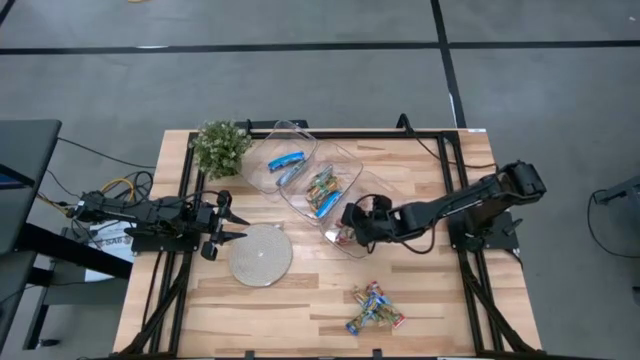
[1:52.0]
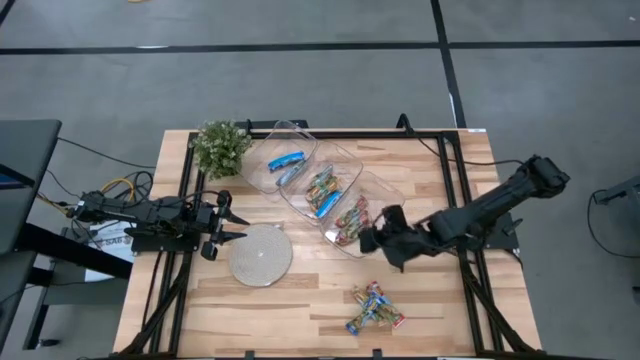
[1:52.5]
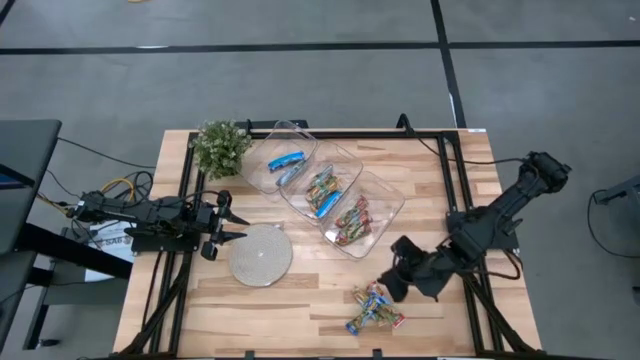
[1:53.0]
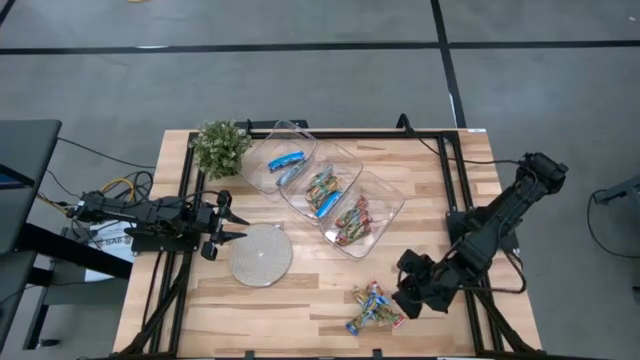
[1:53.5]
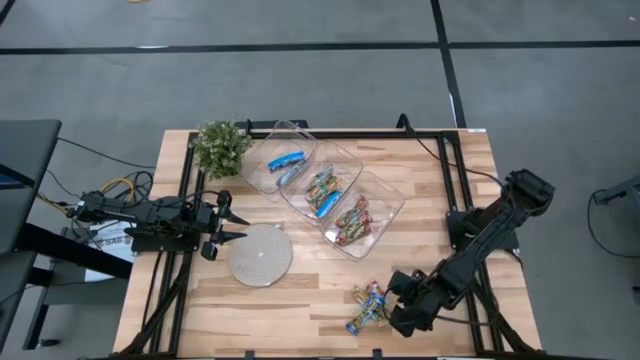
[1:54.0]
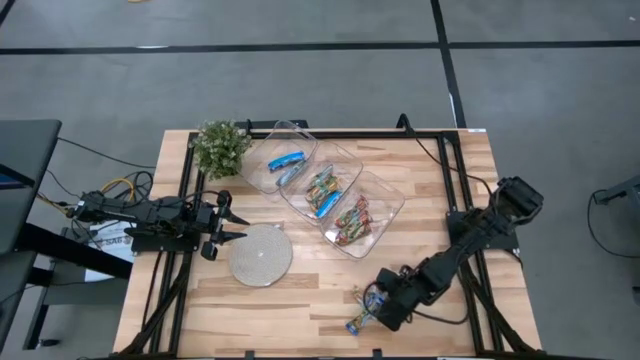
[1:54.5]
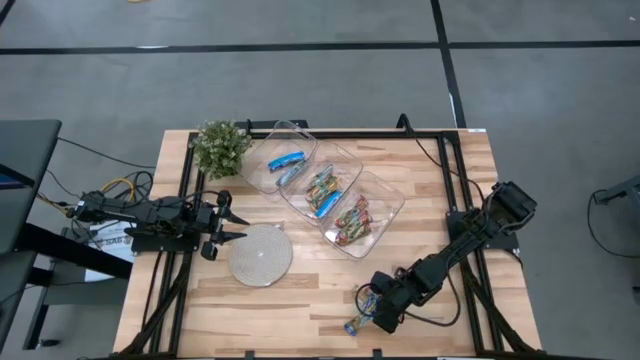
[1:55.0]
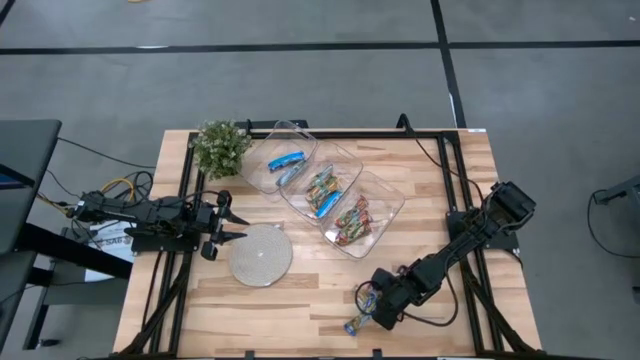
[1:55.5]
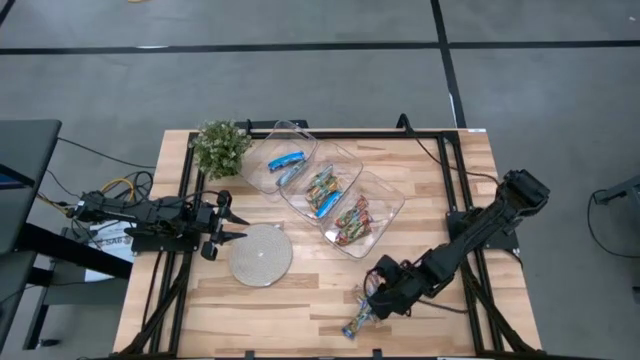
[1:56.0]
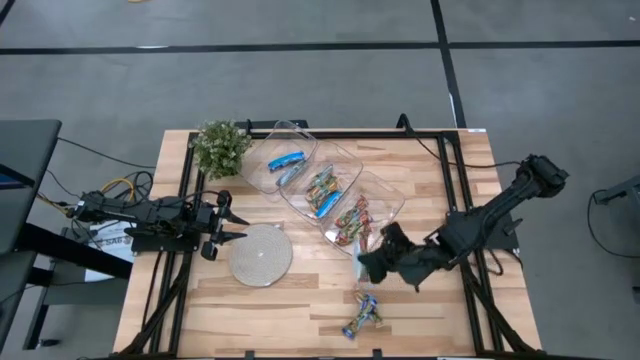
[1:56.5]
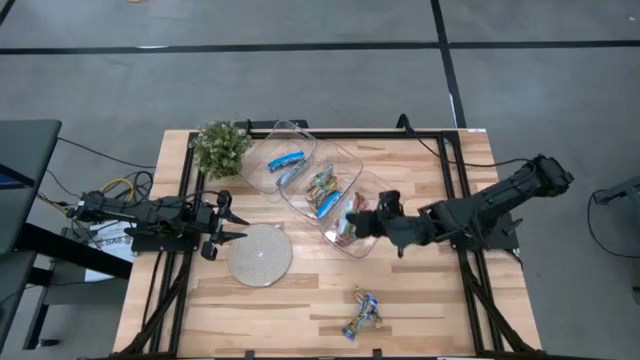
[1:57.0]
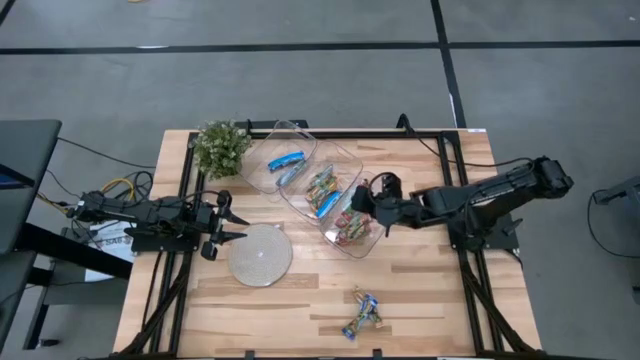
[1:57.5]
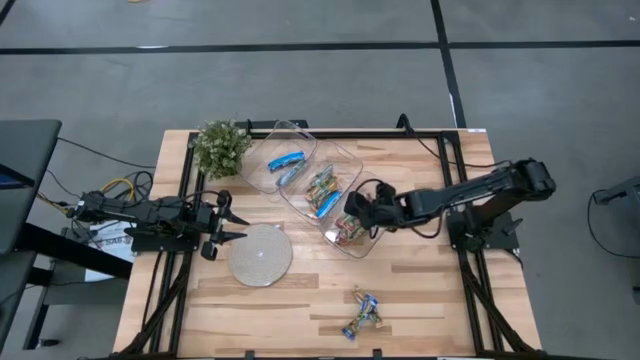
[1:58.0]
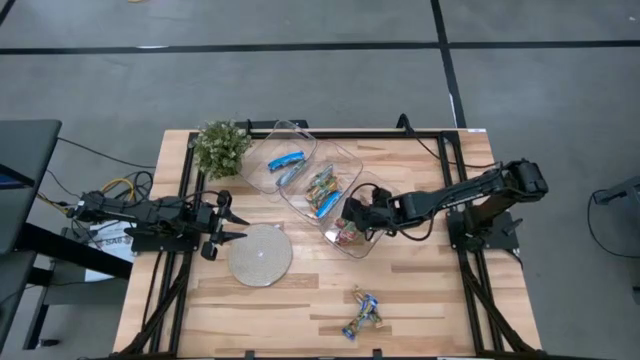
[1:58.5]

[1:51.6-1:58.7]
Task: Pick and place Granola Bars by type
Put the red granola bar into the bottom transparent bin

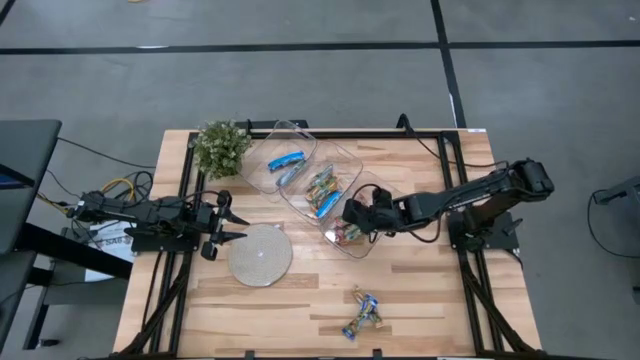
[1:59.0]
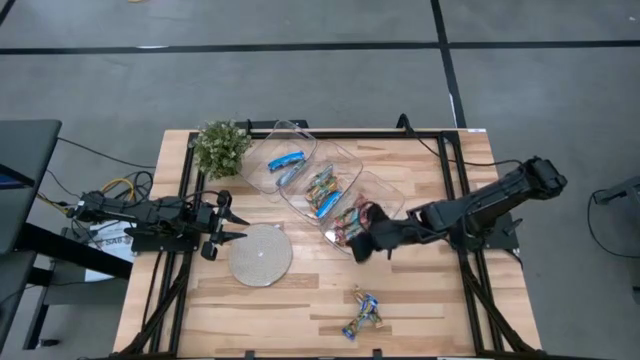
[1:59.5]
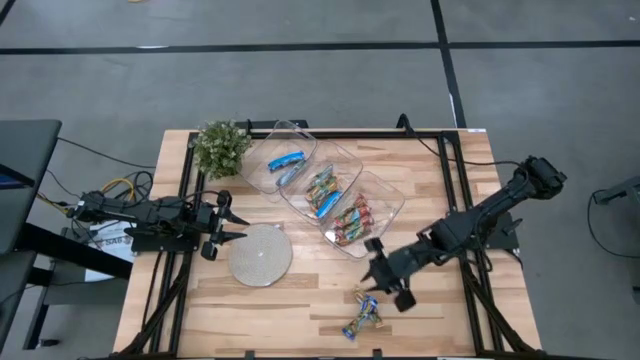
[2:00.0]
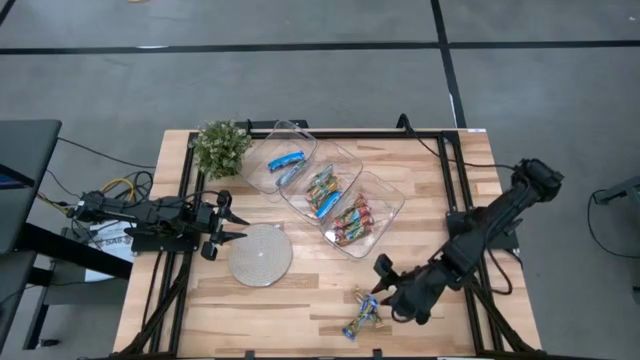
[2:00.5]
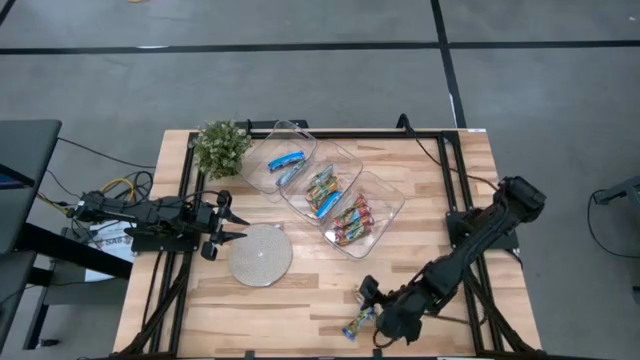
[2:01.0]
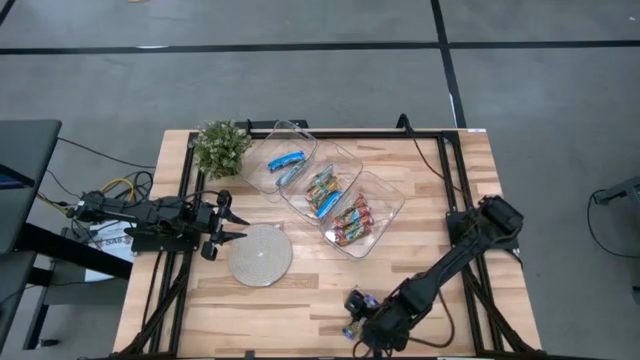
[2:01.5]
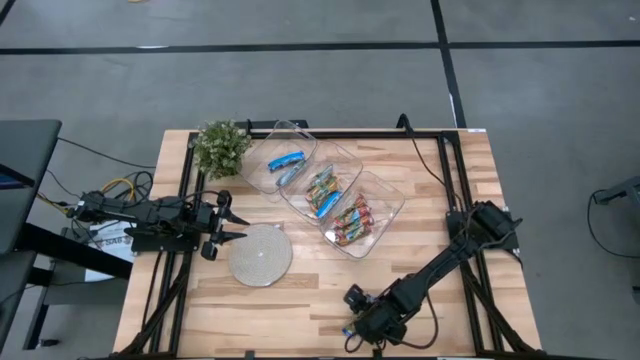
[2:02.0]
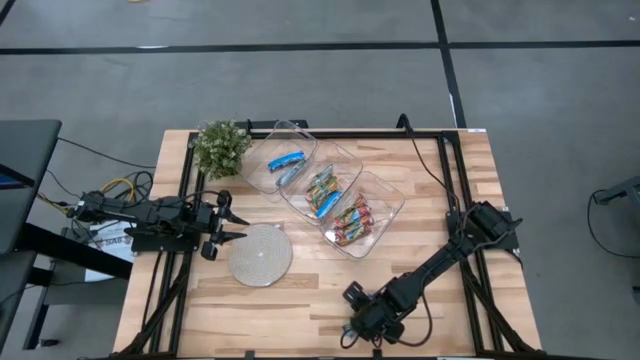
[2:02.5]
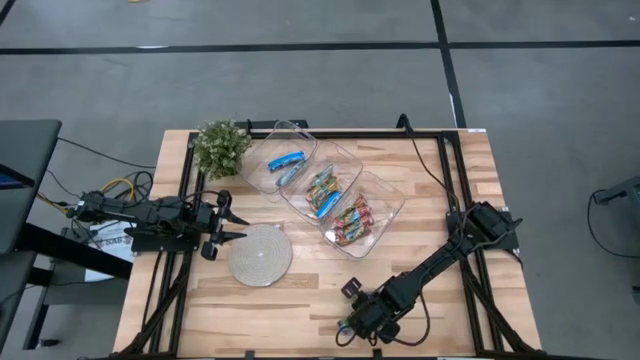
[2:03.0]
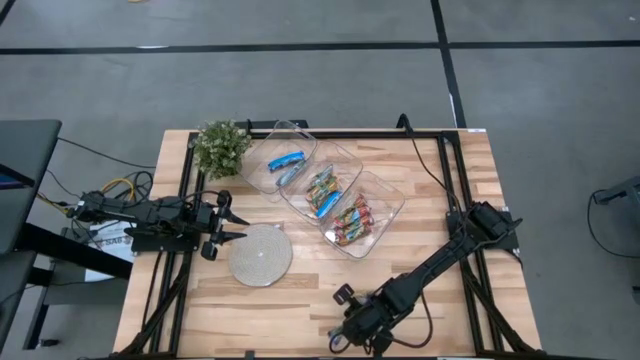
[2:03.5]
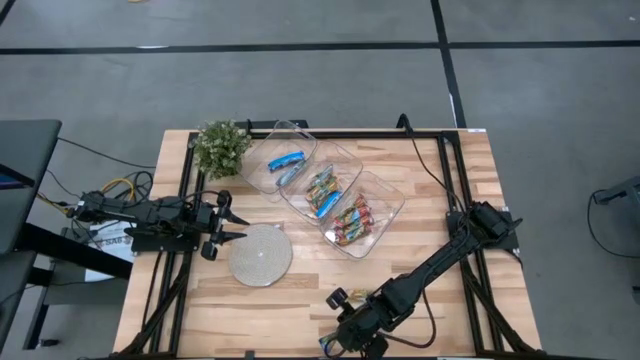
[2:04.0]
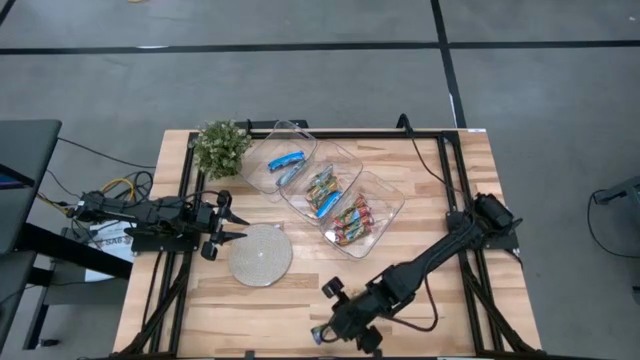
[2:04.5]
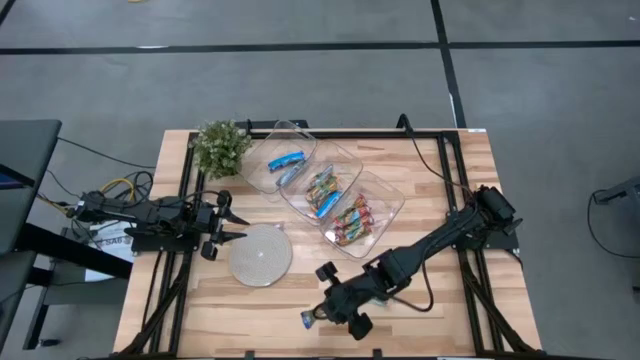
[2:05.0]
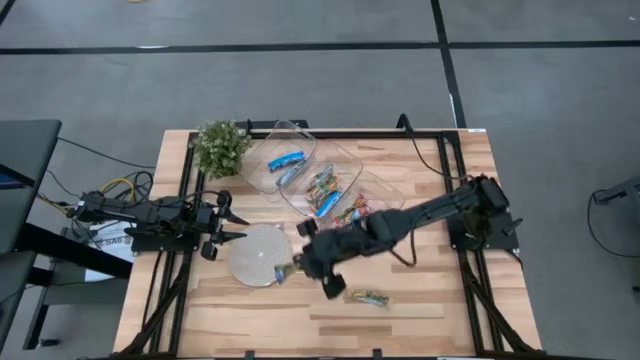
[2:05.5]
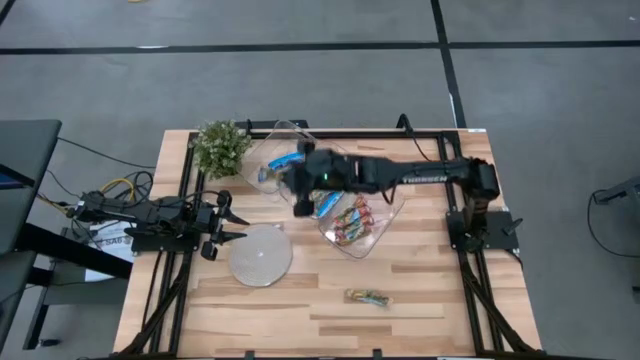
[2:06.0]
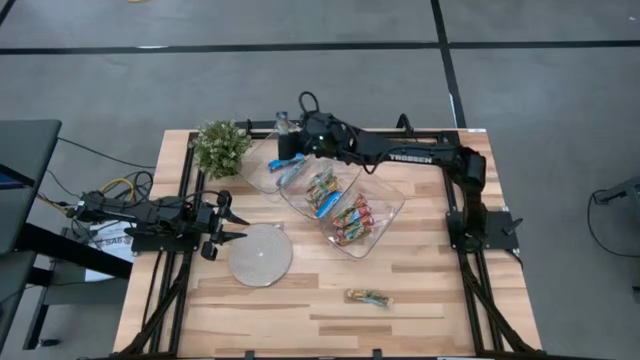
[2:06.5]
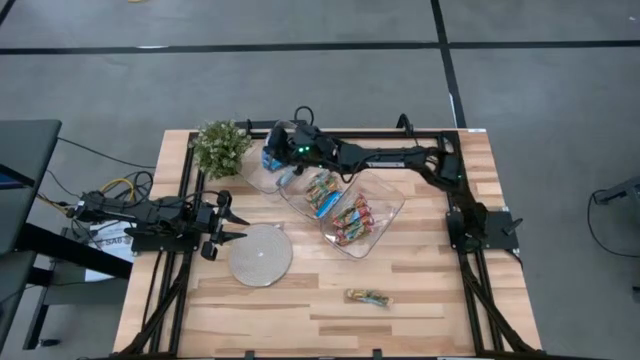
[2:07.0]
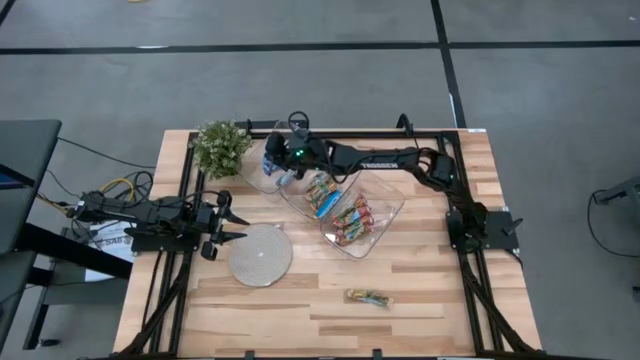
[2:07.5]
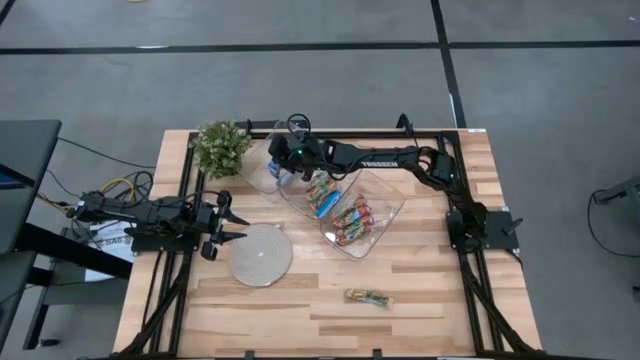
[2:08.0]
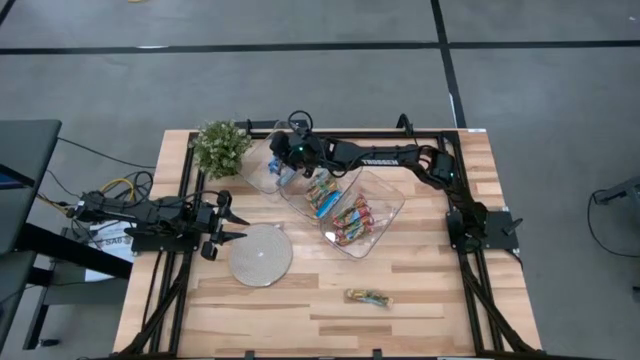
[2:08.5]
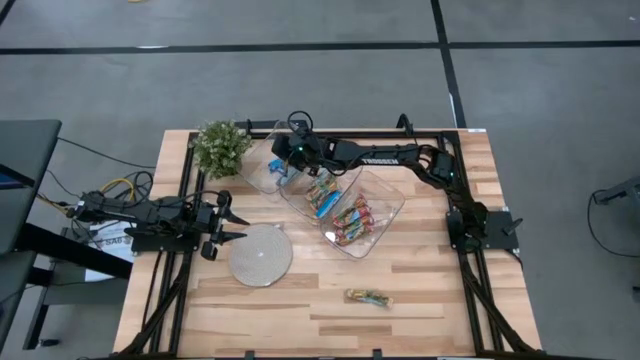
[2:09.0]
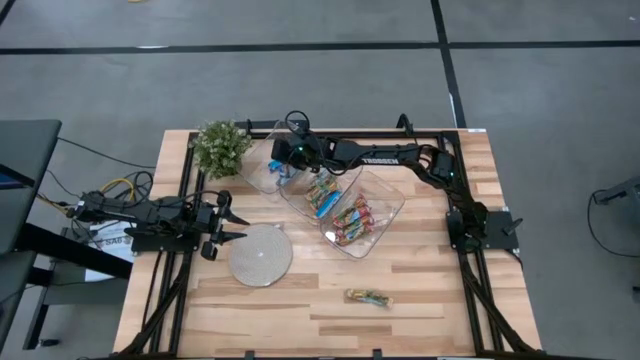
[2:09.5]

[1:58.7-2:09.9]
Put the blue granola bar into the top transparent bin

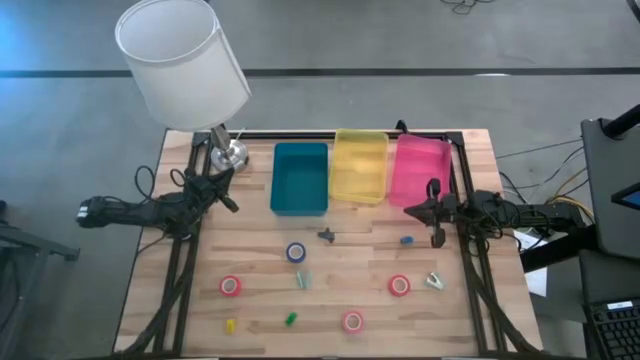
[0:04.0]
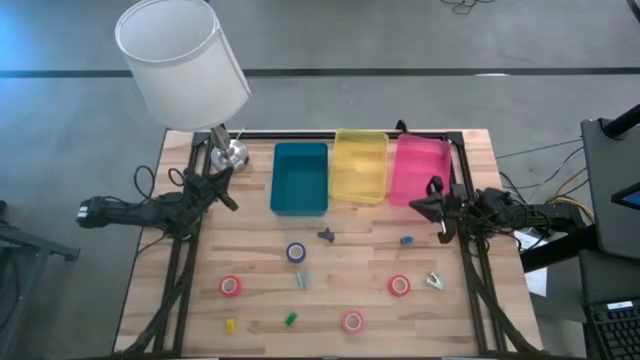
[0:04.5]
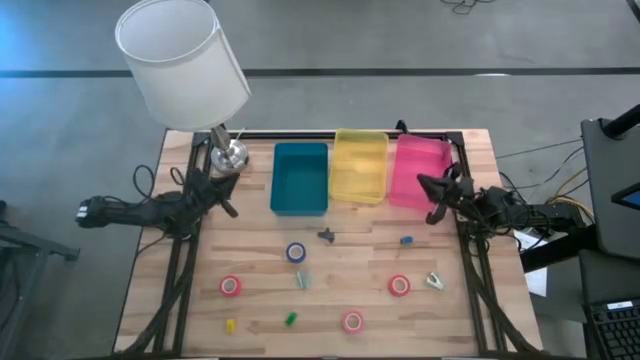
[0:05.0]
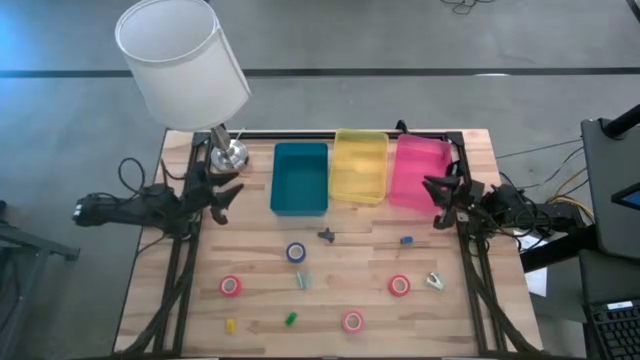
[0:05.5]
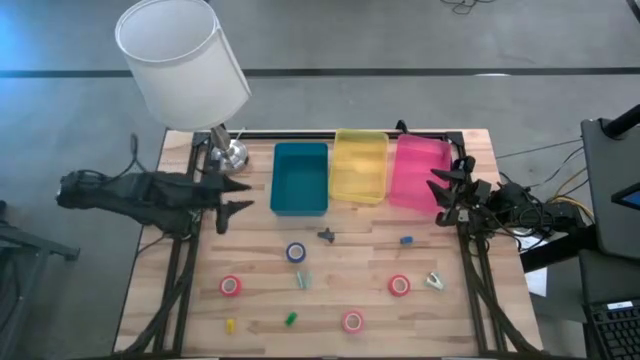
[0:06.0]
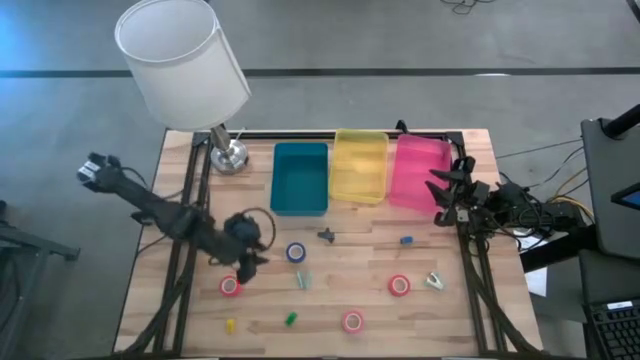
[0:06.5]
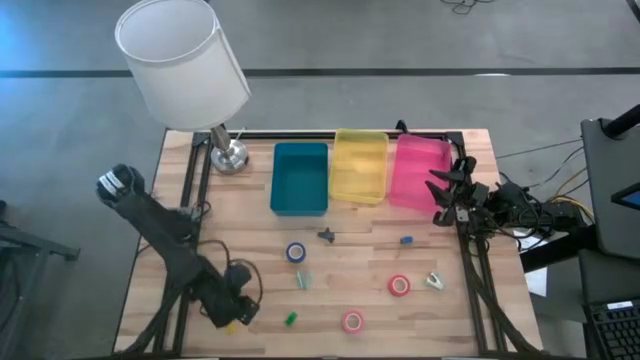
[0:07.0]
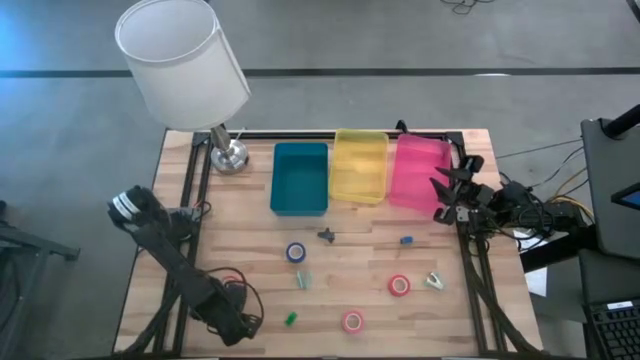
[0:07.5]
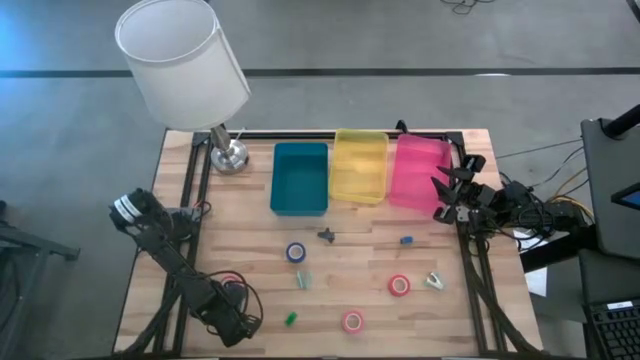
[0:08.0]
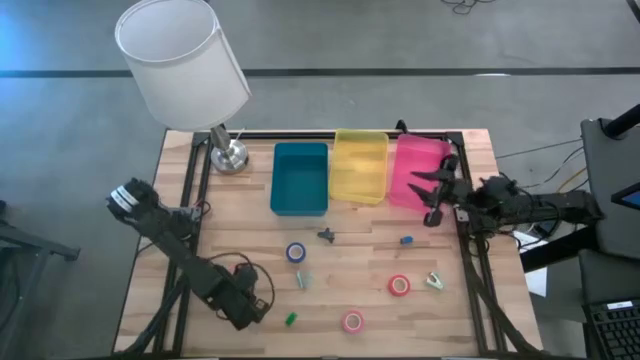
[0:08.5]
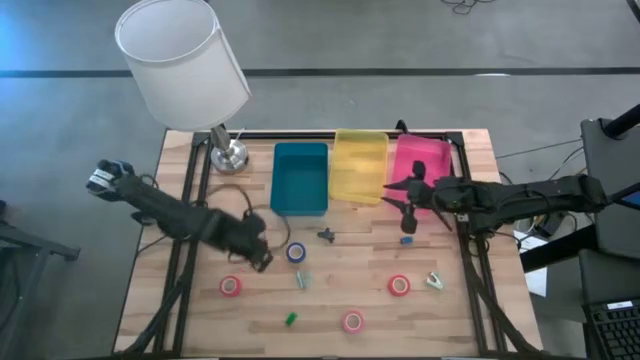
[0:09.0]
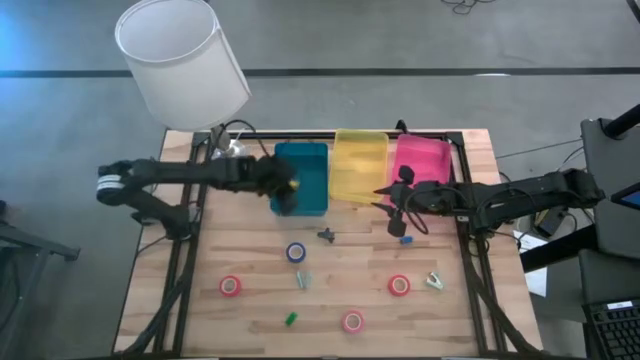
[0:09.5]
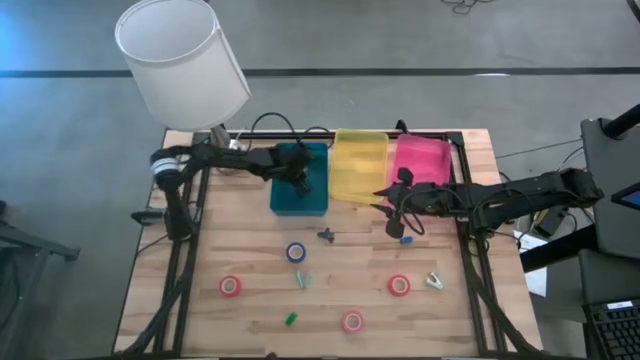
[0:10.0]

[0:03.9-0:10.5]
Task: Pick and place Stapler, Stapler remover, tape
Put the yellow stapler into the blue bin
